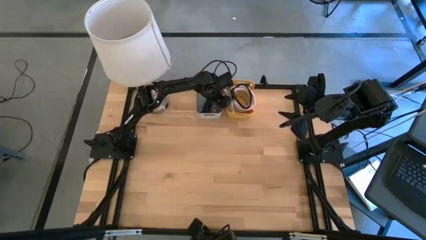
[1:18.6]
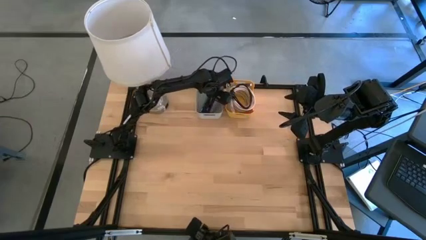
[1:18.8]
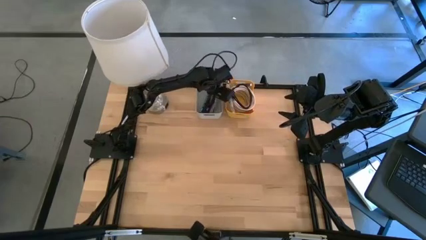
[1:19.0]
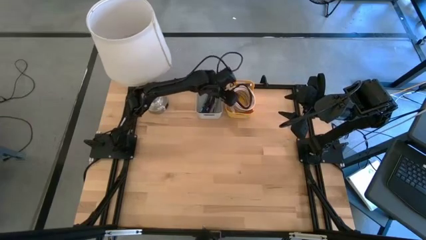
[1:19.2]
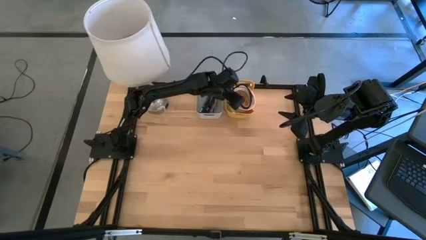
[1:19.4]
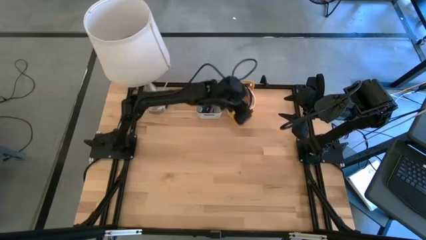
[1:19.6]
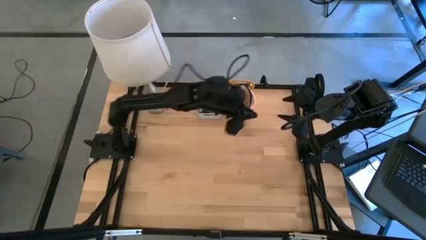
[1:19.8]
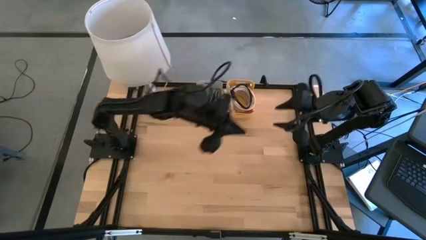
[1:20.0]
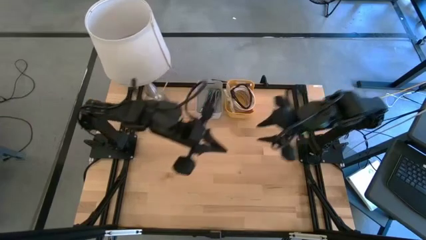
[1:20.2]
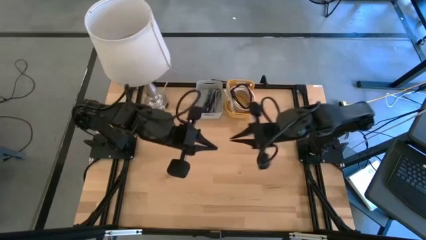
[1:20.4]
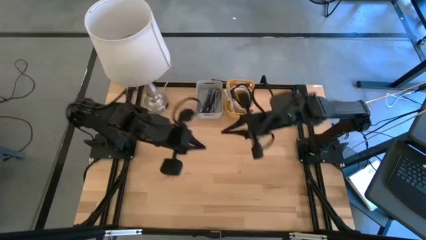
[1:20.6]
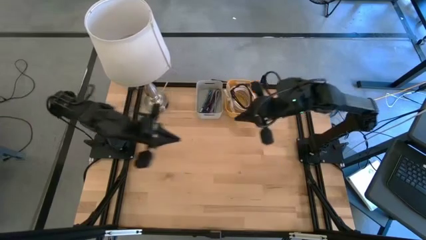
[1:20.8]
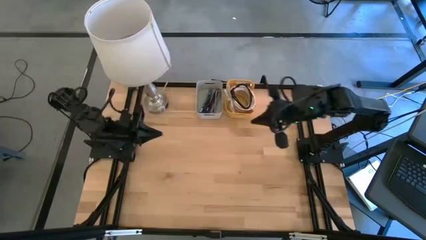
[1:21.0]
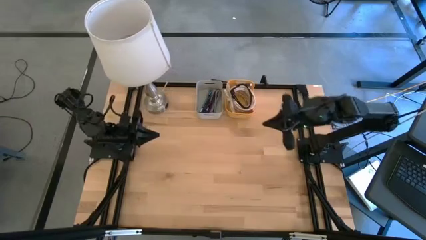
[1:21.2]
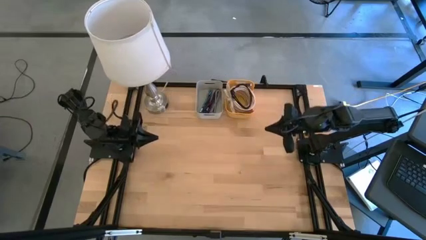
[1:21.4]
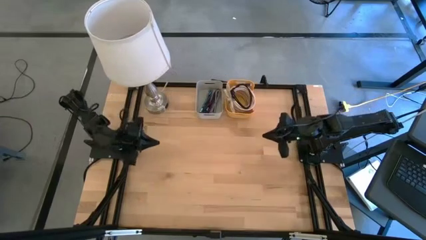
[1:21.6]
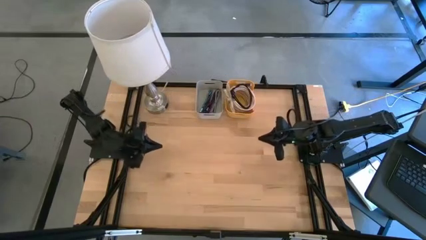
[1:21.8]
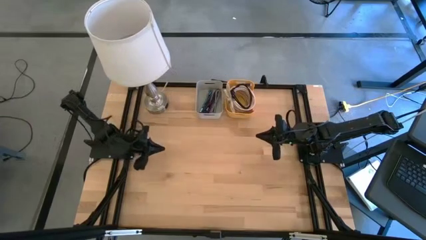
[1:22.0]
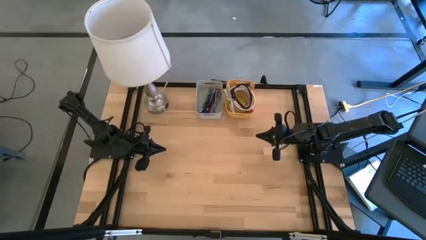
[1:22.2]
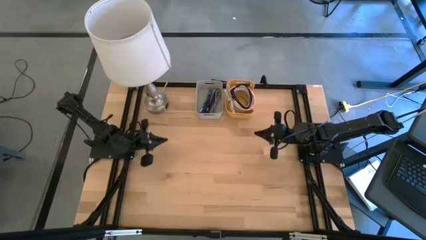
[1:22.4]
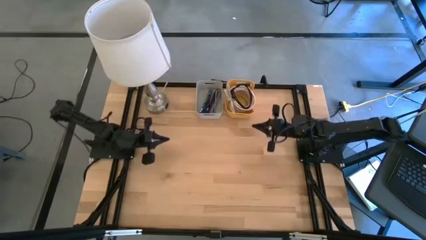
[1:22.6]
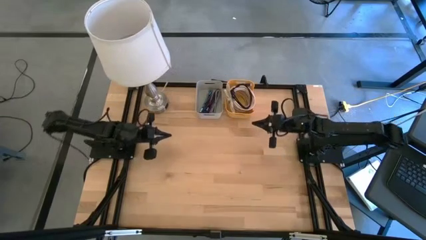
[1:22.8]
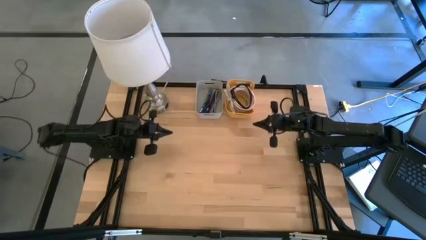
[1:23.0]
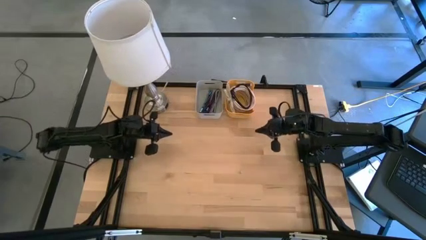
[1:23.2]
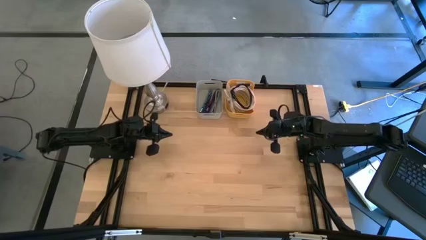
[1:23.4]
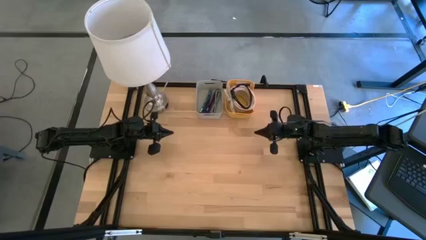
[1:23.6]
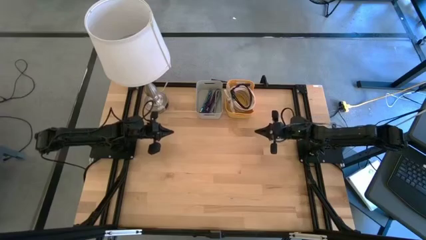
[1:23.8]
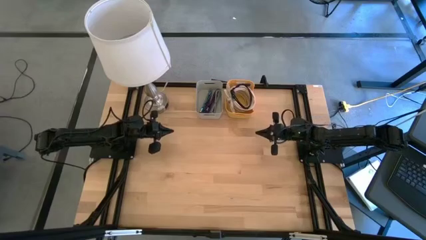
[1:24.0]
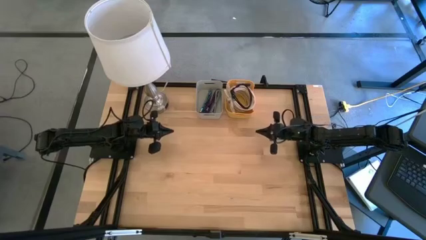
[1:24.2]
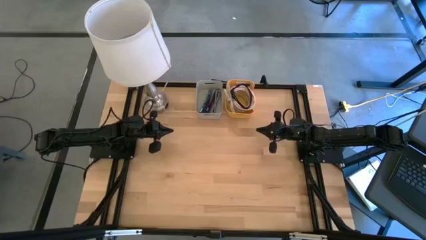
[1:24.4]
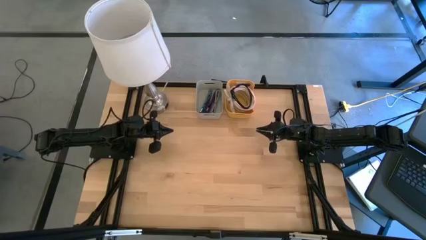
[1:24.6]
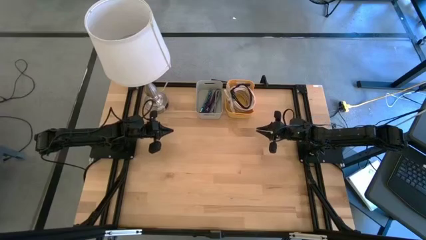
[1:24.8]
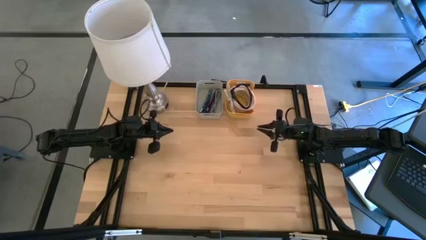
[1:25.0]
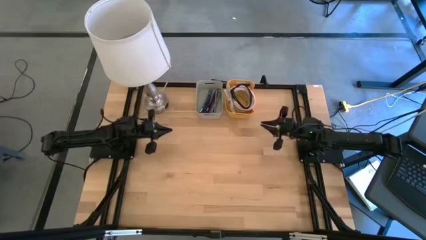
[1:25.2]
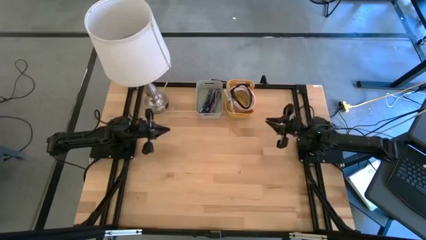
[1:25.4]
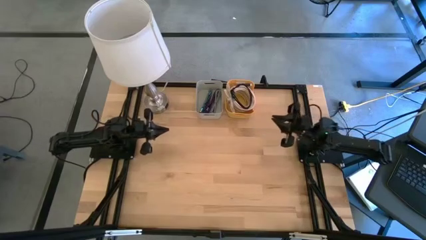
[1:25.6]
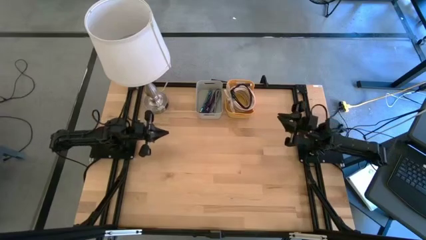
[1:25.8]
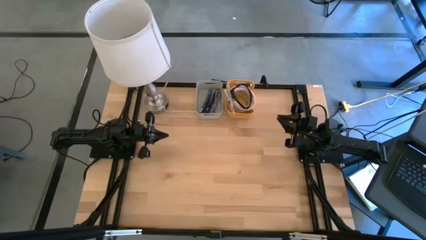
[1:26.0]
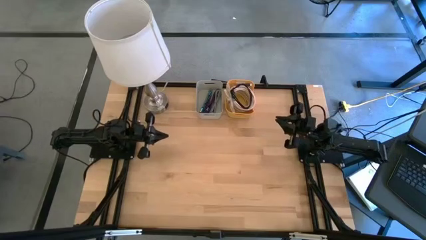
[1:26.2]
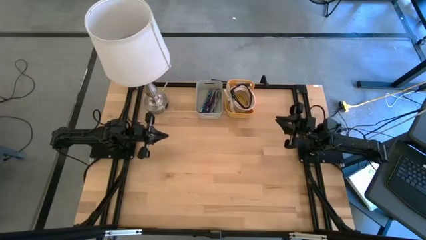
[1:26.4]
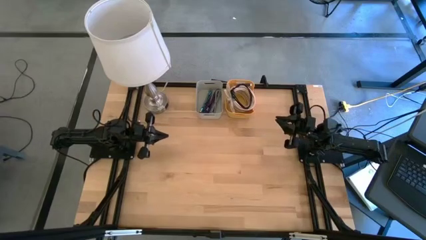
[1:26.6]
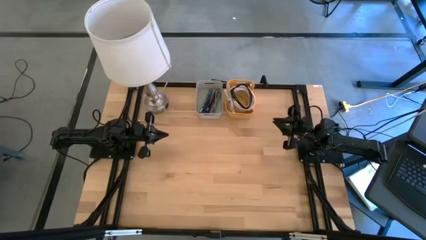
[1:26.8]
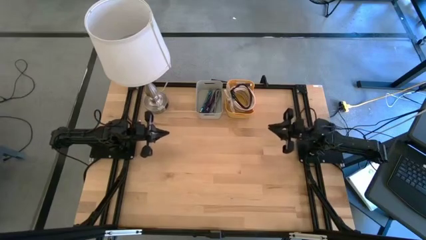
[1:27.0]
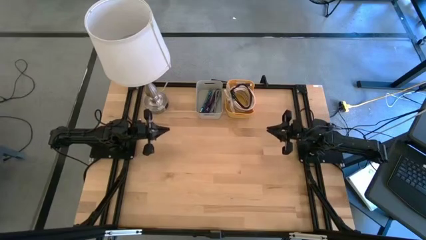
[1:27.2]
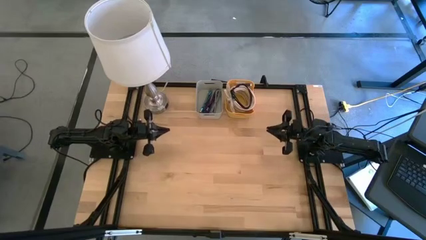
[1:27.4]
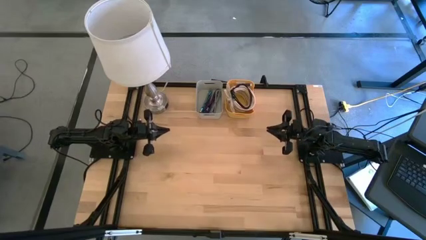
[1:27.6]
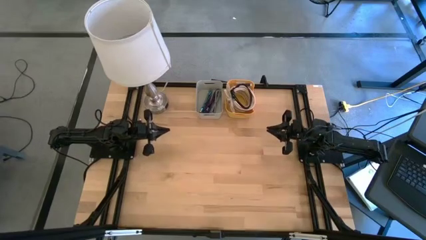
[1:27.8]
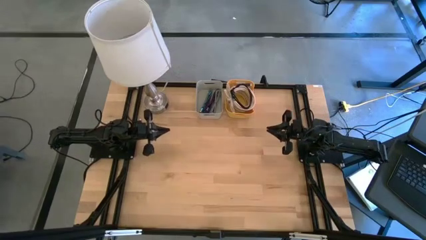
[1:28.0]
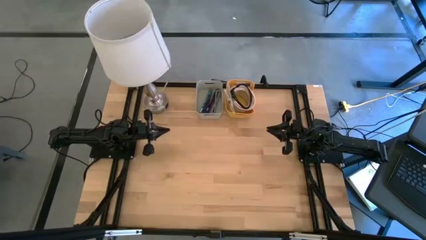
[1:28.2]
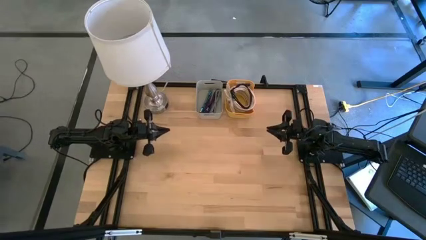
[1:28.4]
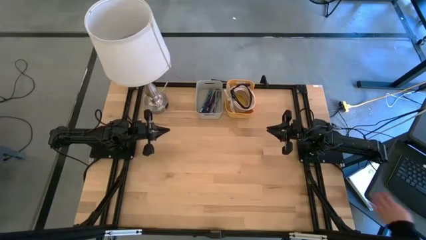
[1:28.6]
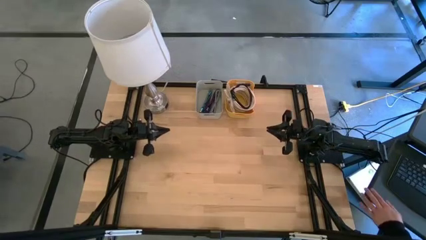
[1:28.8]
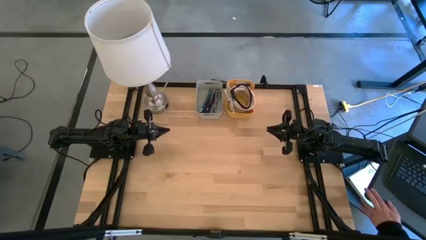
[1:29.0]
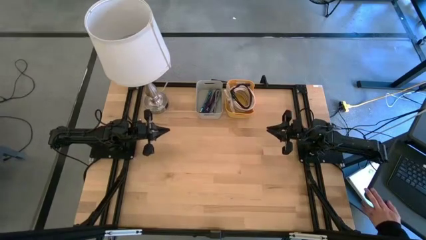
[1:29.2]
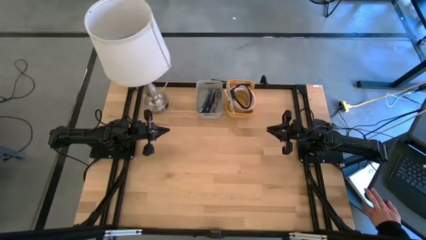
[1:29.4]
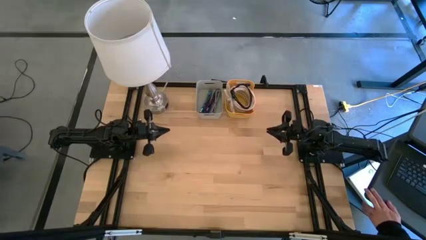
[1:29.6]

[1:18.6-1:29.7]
Return to Home Position
